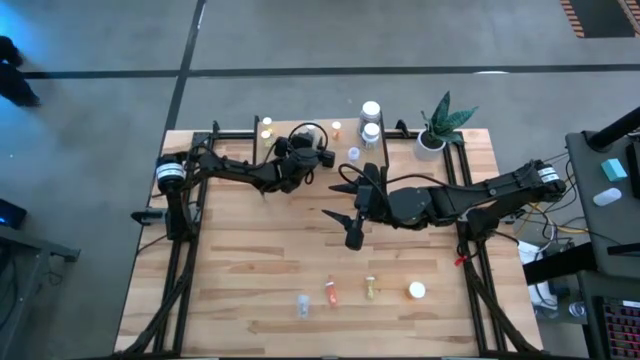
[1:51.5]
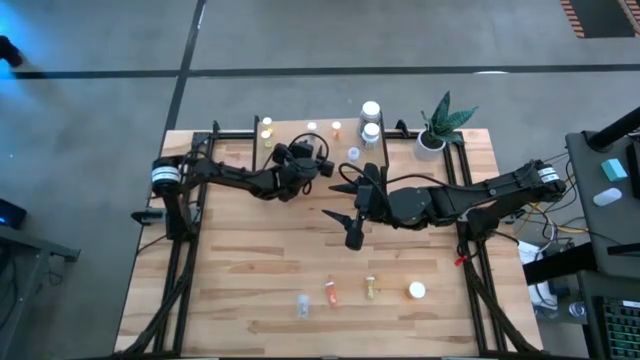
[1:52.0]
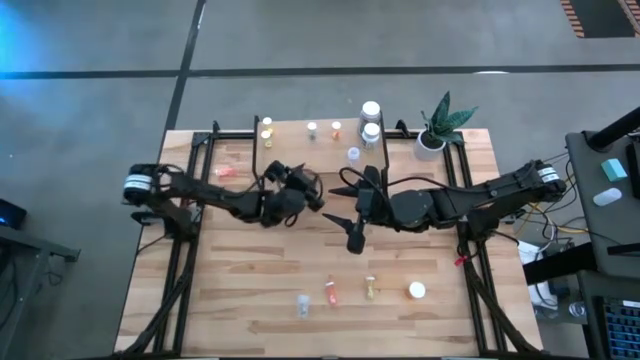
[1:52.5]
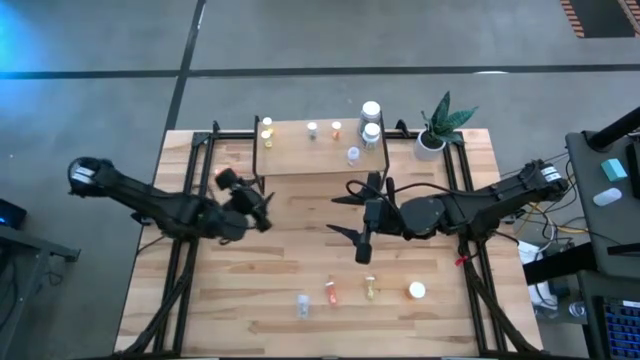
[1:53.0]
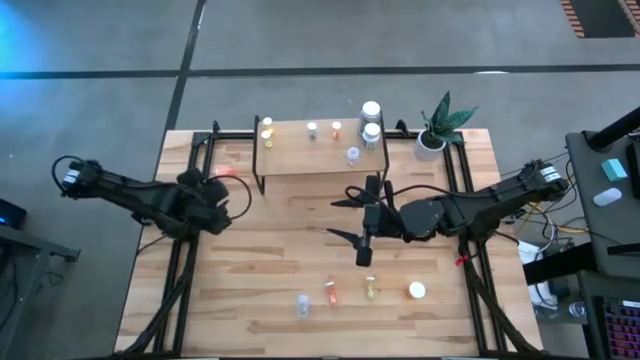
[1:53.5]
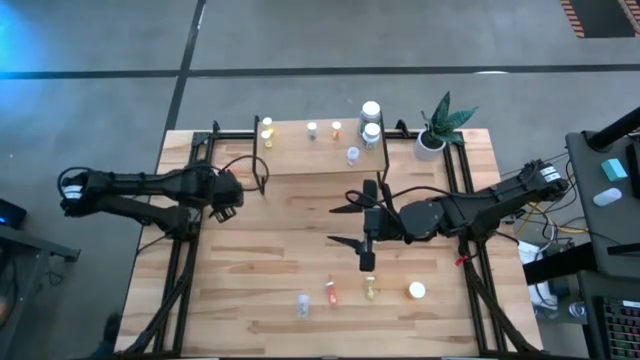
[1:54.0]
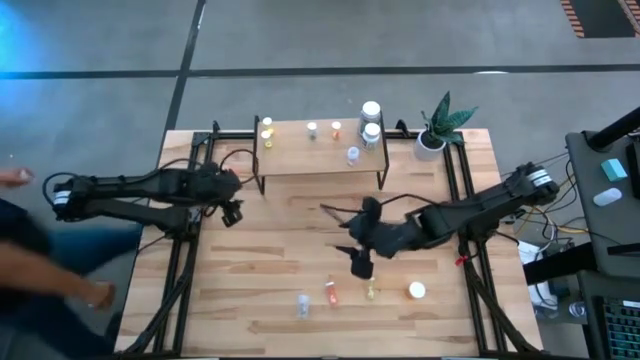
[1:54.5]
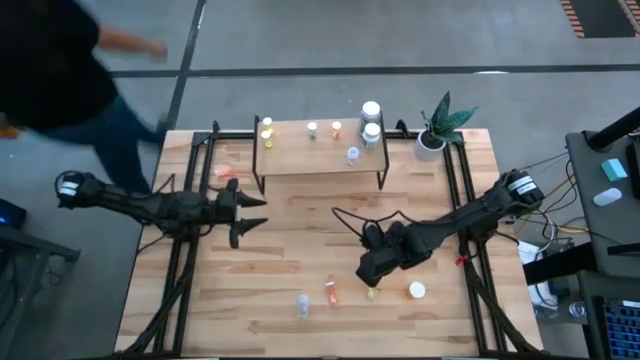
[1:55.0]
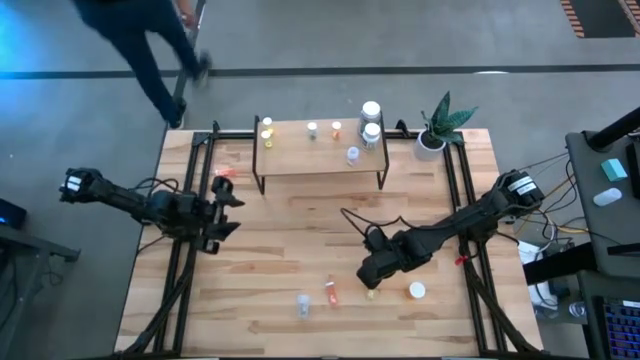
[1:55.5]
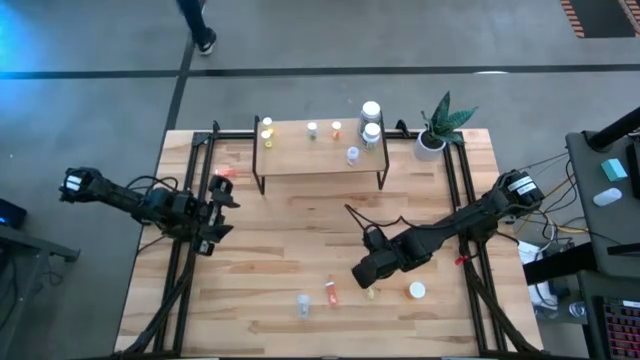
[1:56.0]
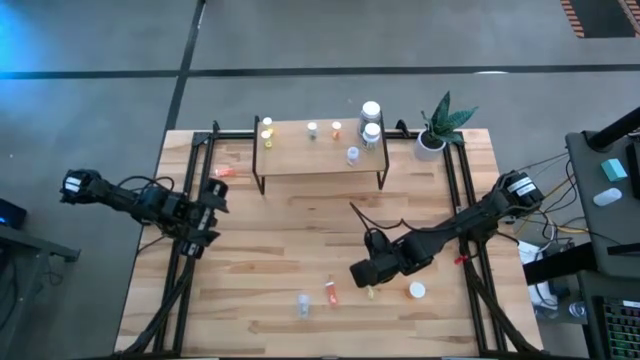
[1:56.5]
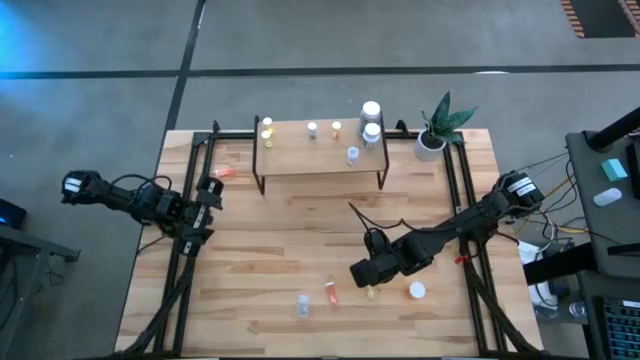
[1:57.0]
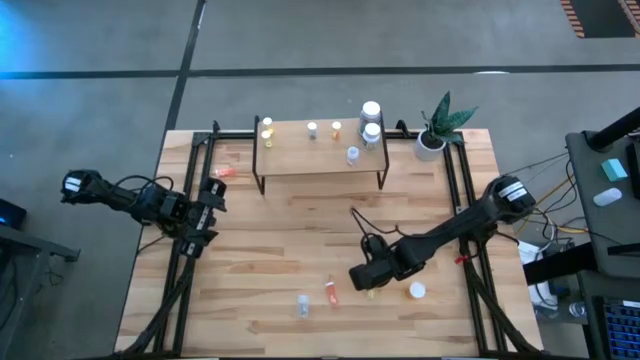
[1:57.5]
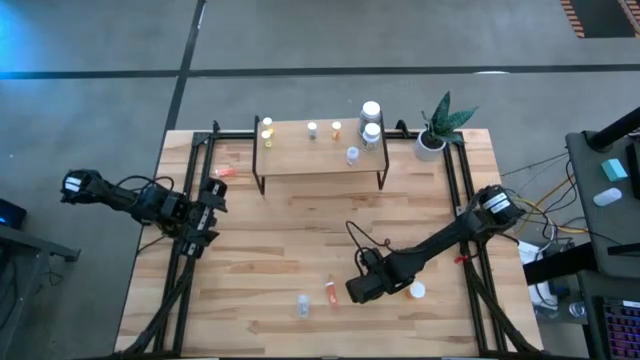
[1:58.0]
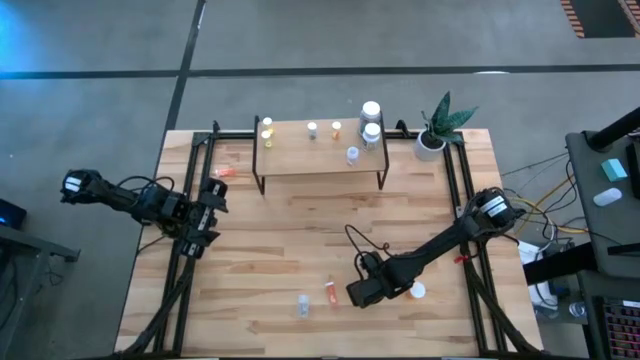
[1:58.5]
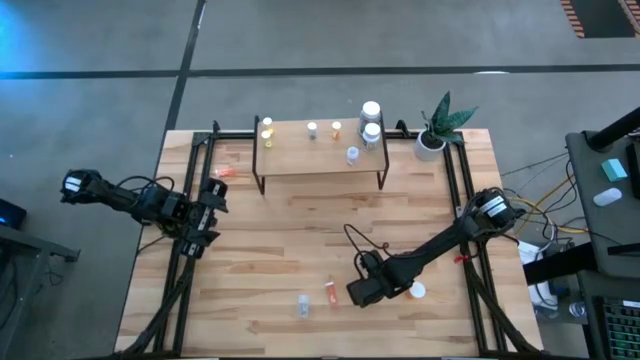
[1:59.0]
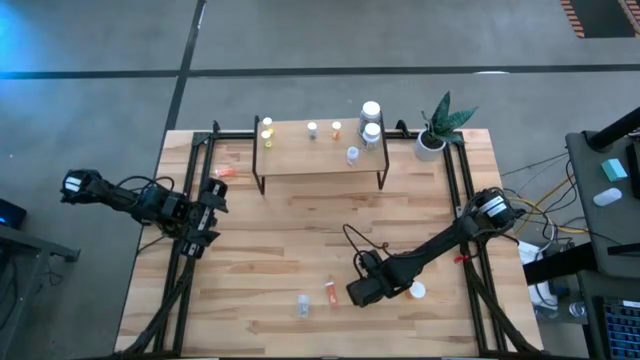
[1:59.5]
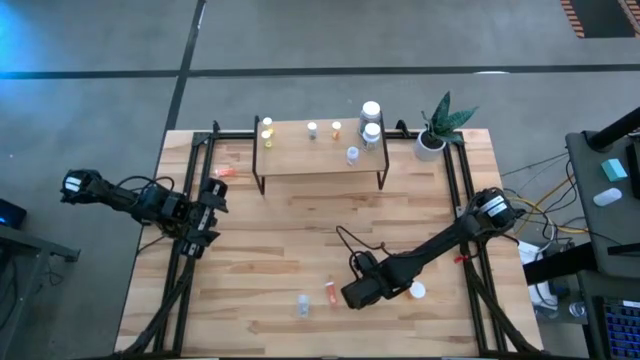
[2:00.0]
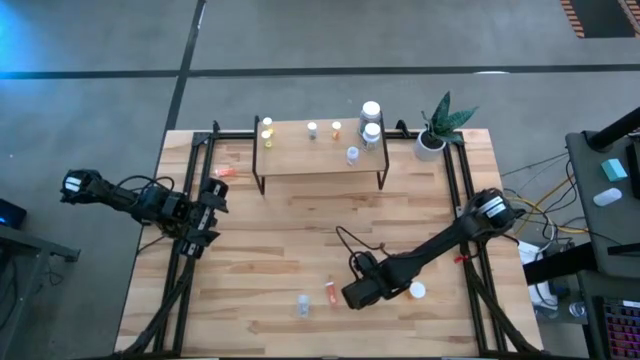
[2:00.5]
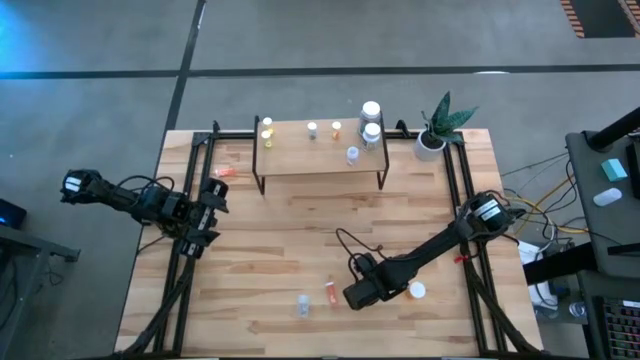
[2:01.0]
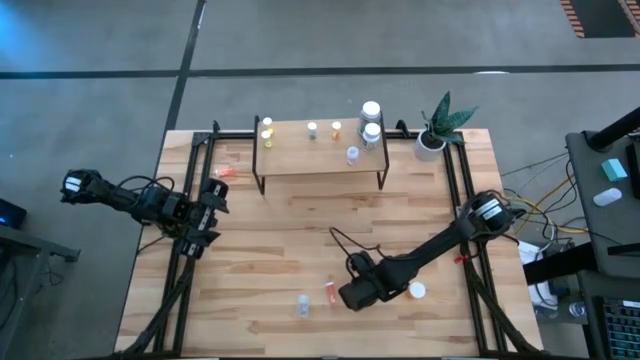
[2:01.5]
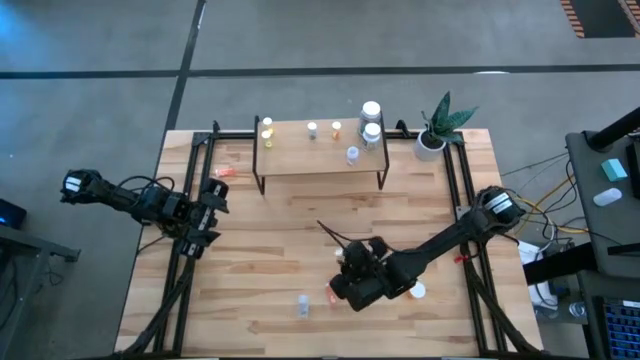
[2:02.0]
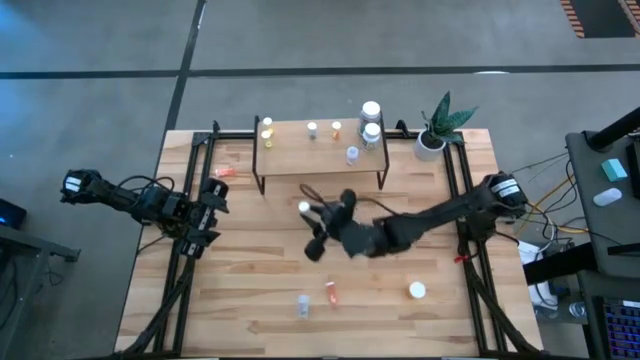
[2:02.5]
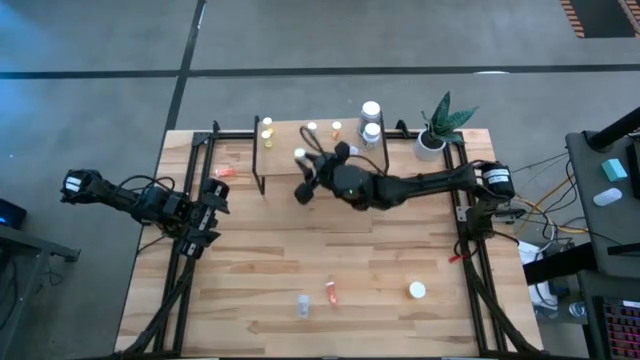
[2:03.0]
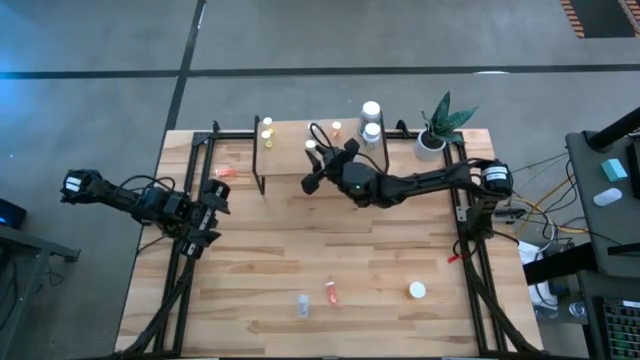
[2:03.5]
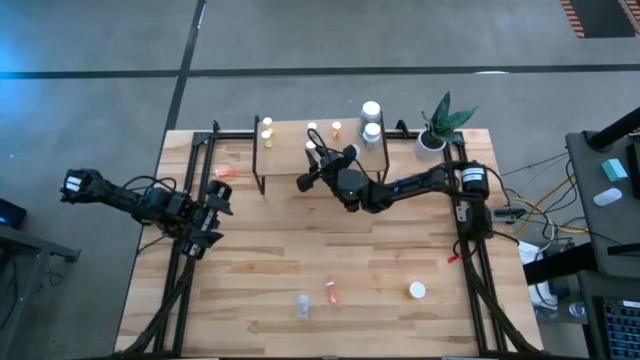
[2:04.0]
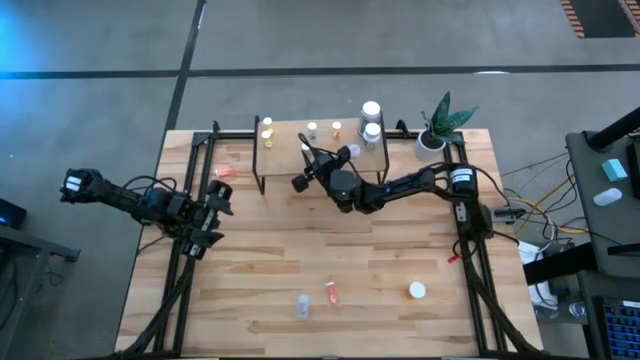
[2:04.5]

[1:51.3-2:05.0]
Task: Pick and place medicine bottles onto shelf by color
Put the yellow pill bottle on the shelf

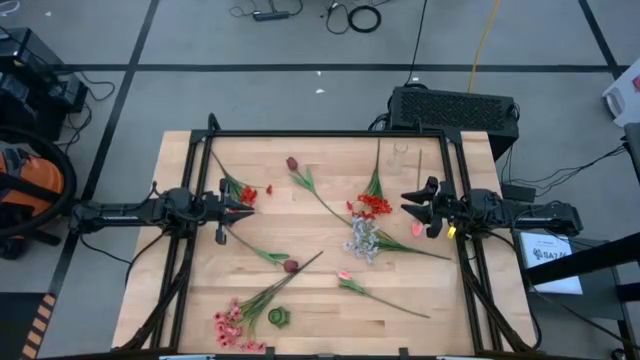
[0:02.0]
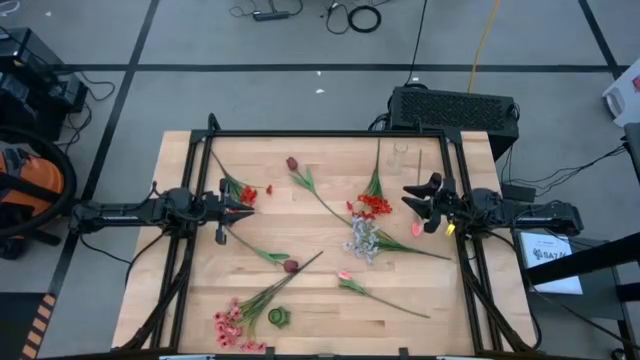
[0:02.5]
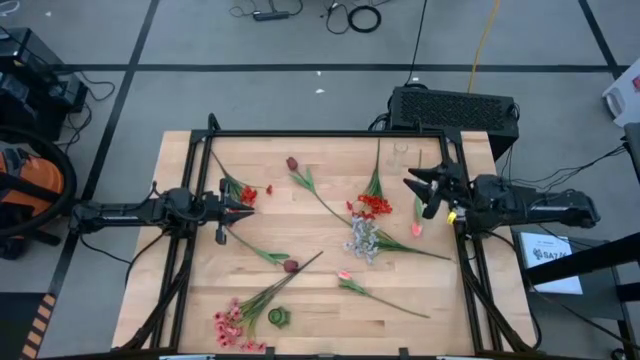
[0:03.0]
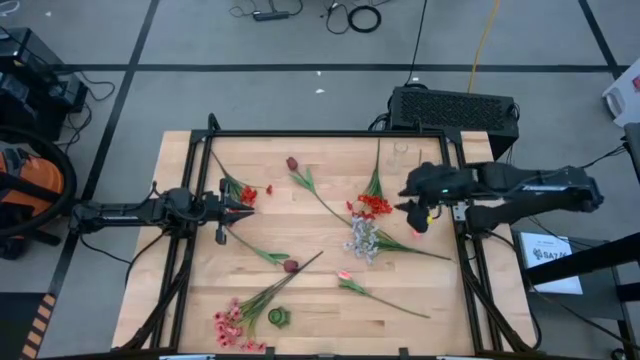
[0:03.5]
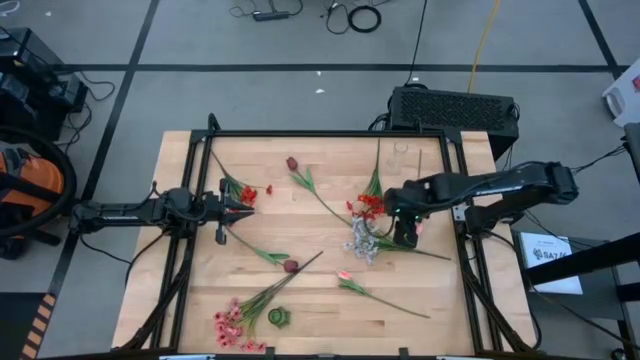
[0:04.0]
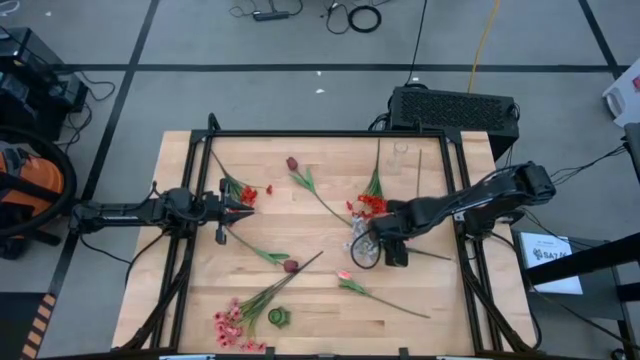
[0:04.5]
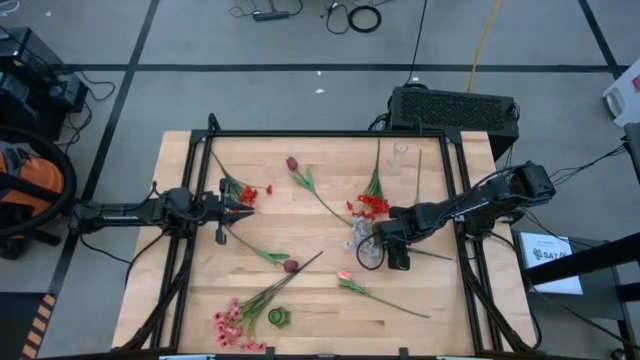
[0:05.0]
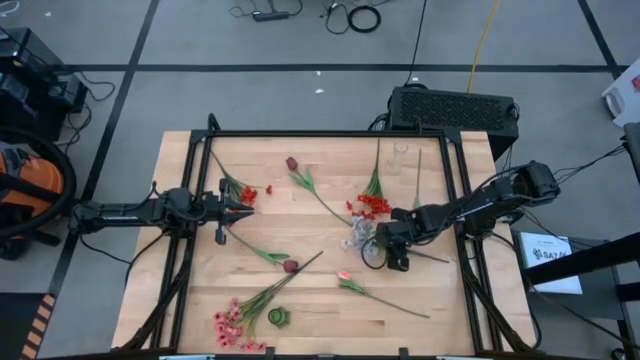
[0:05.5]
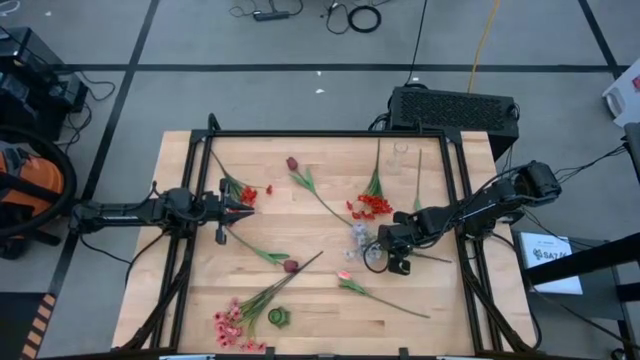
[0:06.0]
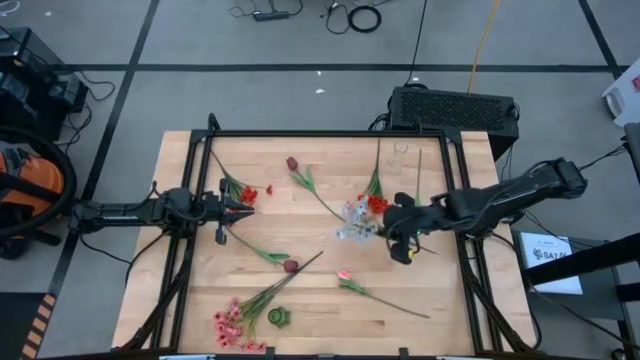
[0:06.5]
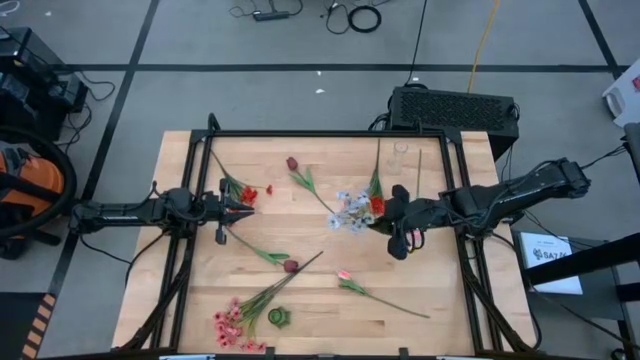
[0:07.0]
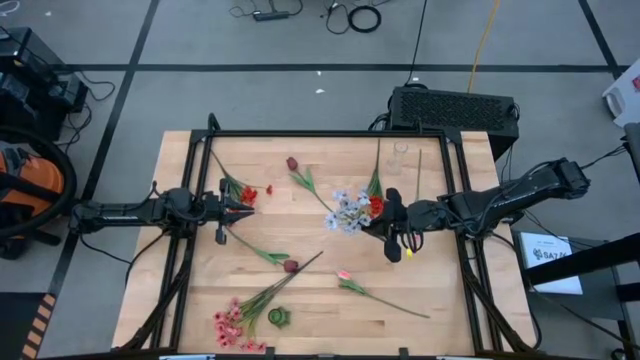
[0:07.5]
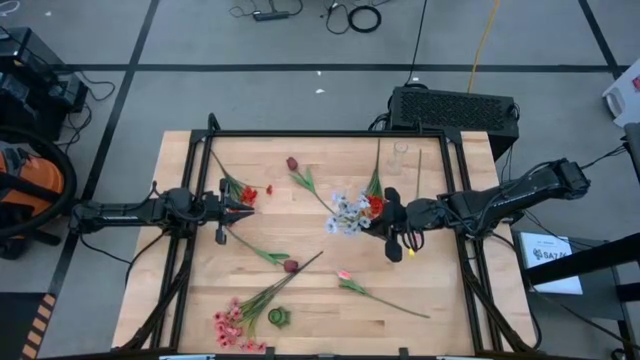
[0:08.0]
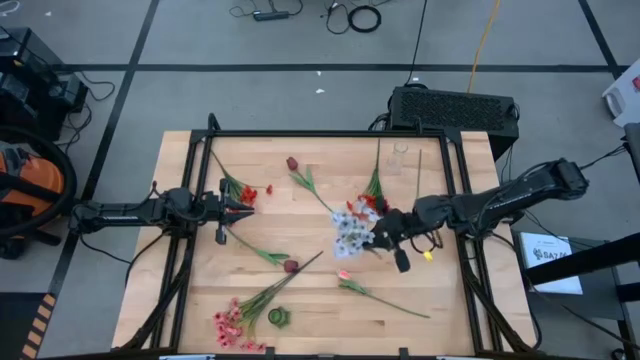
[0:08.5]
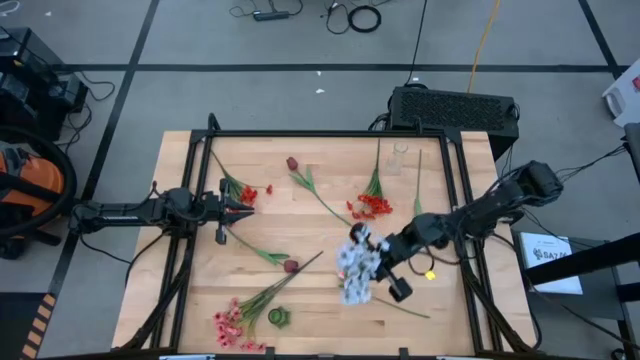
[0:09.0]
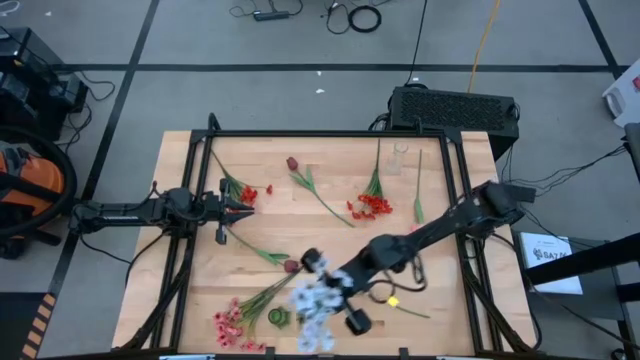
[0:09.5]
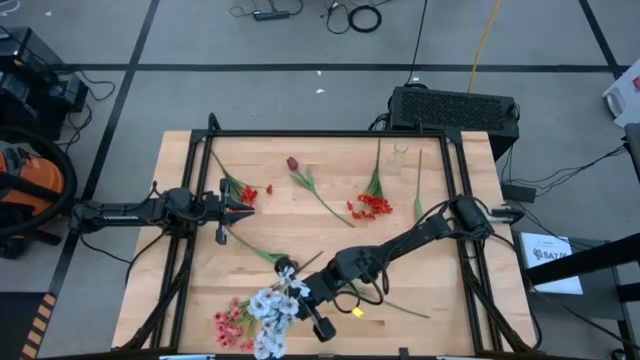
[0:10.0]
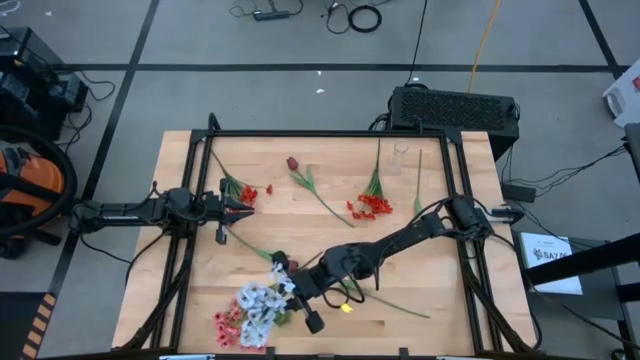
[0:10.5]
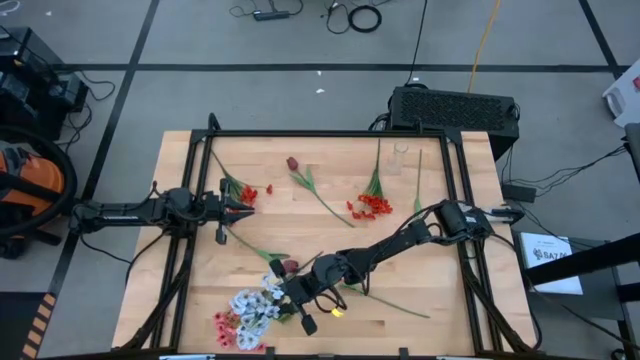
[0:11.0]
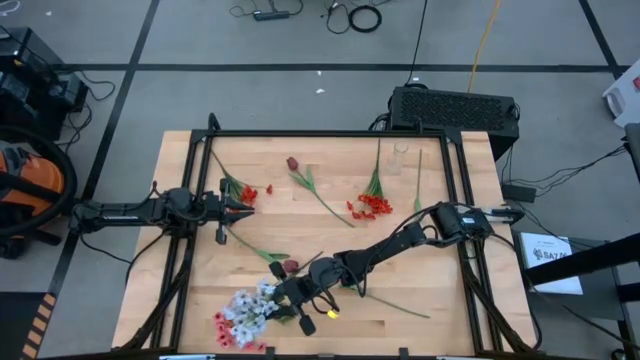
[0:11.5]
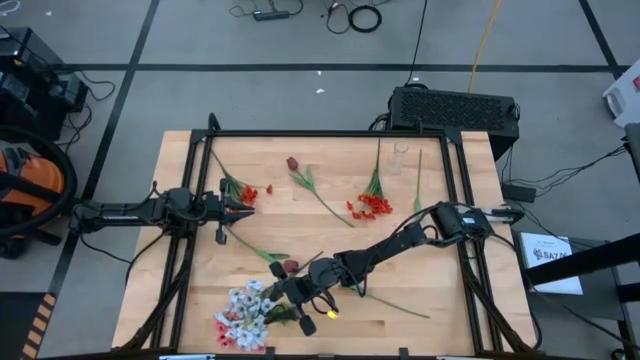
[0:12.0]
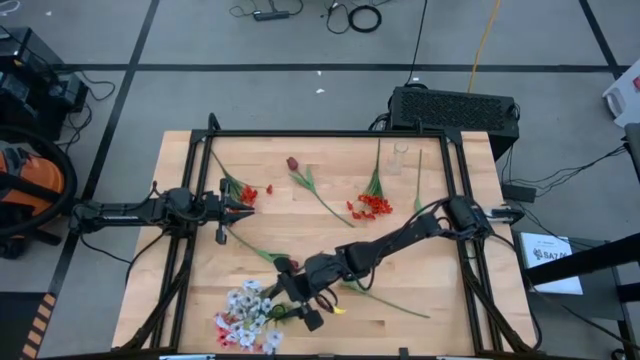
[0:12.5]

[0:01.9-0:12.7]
Task: Sort flowers into vase by color
Put the white flowers into the green vase
